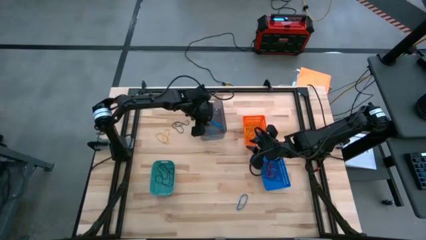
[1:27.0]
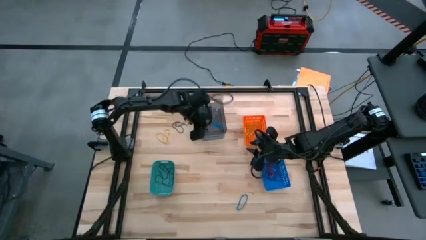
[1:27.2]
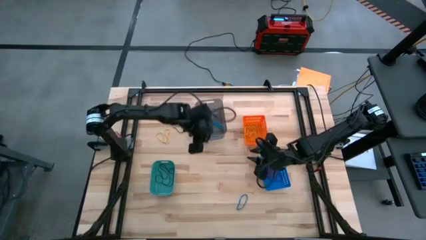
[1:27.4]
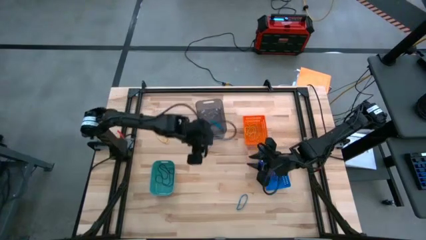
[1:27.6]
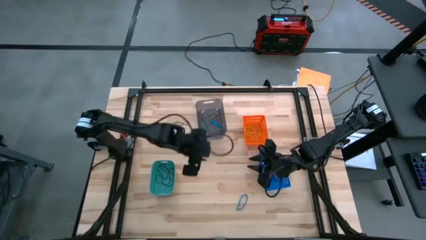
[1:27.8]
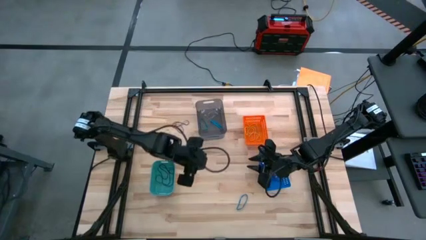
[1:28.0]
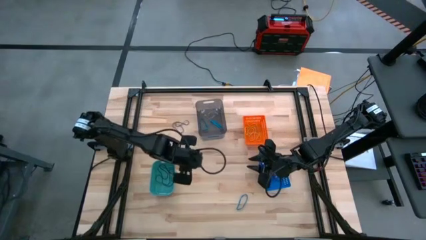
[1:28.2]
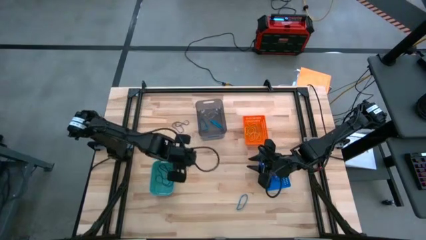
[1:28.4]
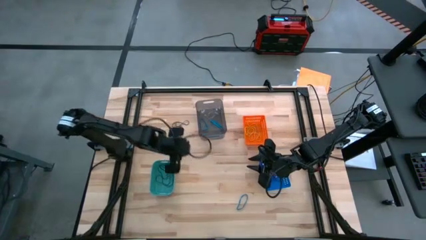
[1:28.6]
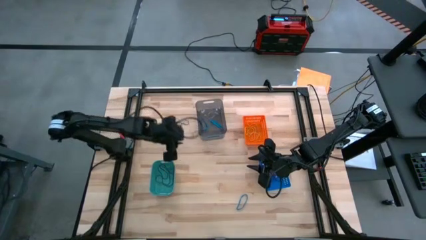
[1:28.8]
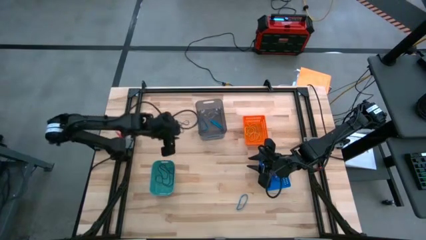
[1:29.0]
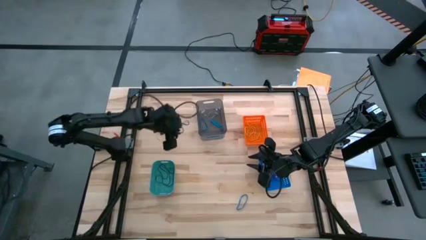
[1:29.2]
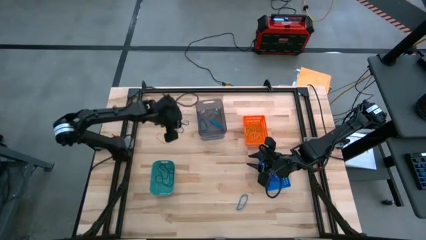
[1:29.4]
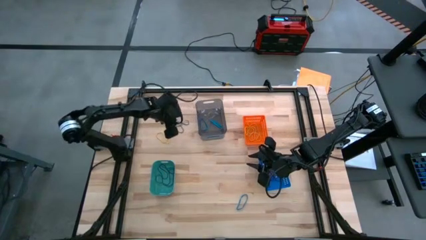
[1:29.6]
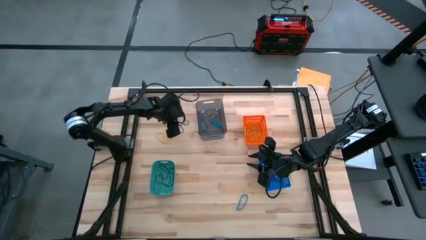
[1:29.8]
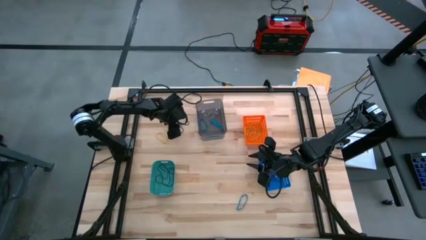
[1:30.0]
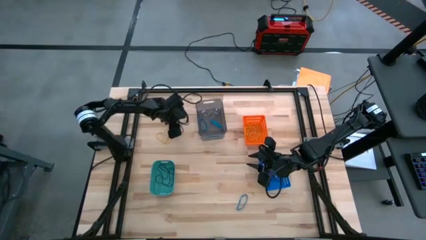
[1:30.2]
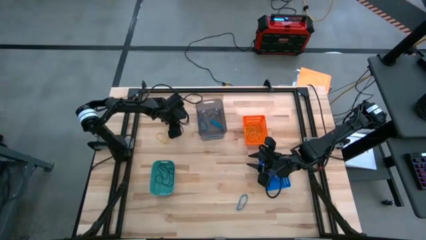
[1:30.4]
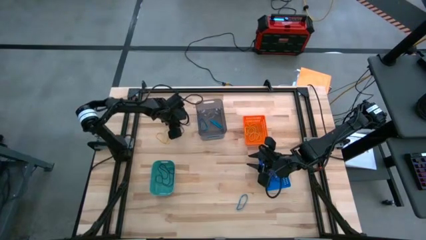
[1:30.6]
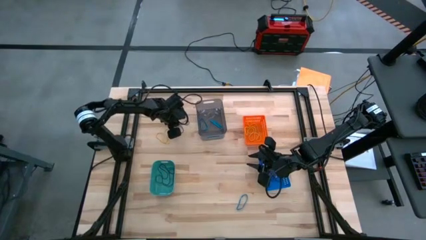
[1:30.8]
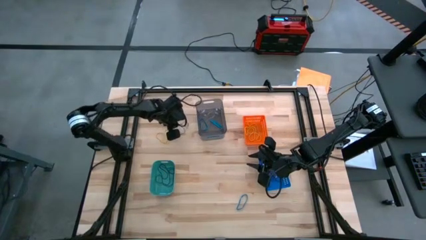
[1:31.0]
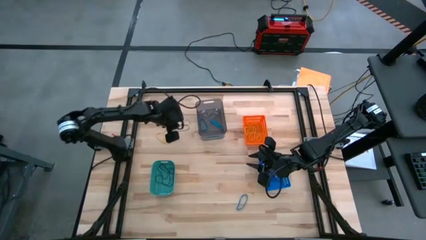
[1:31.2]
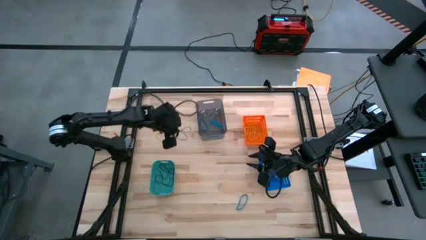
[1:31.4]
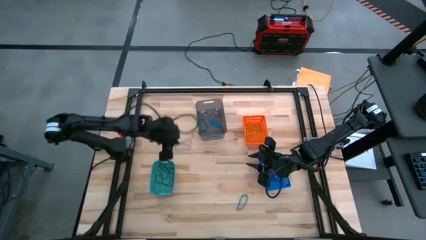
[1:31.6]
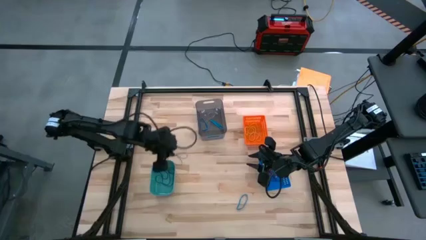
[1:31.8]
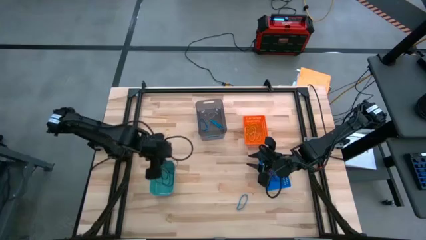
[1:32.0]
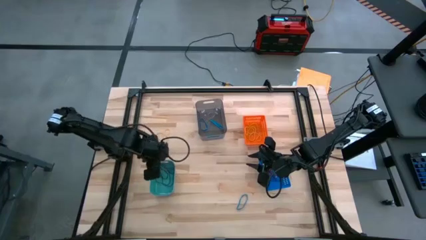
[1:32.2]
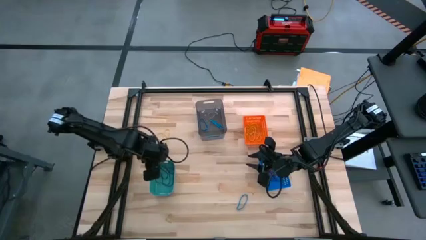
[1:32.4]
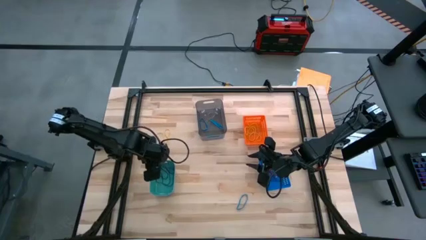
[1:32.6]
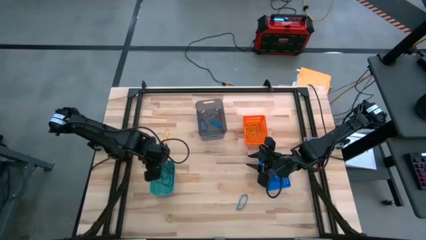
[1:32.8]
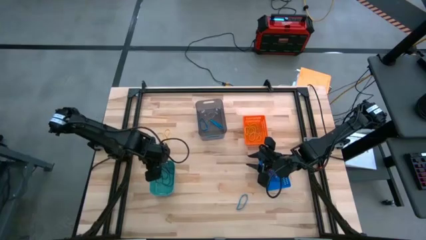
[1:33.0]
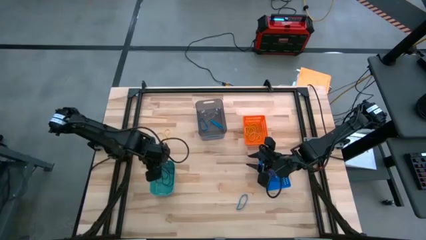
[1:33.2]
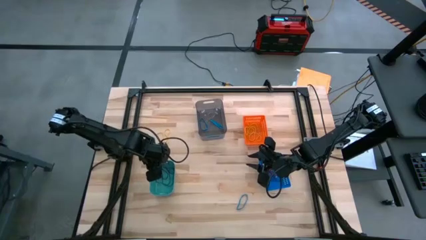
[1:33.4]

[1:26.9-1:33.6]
Task: Sort rubber bands into baskets
Put the black rubber band into the green bin

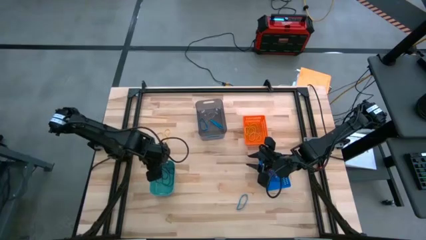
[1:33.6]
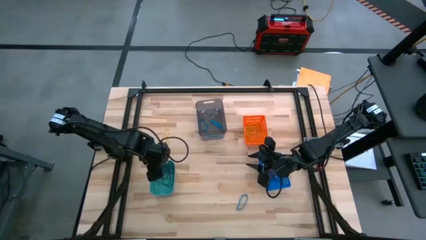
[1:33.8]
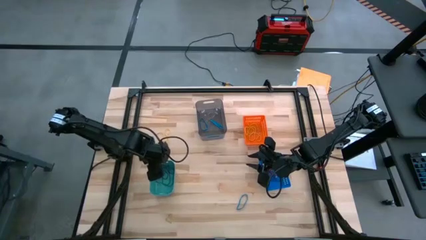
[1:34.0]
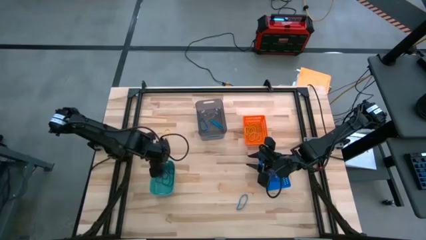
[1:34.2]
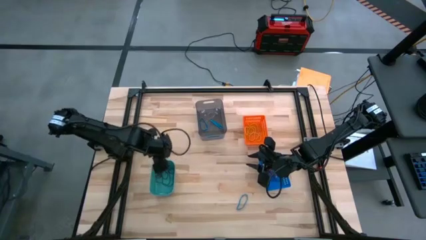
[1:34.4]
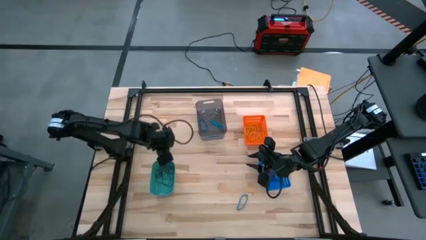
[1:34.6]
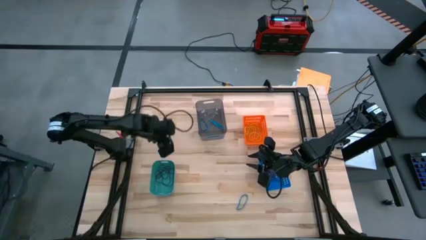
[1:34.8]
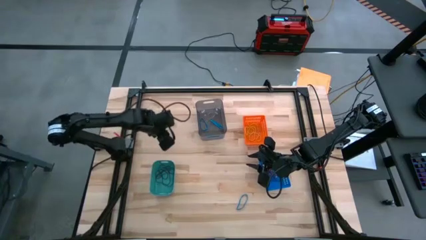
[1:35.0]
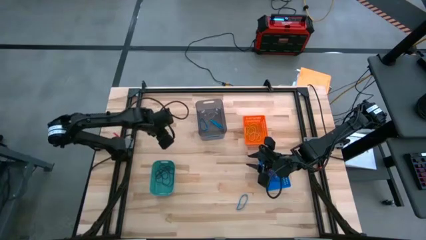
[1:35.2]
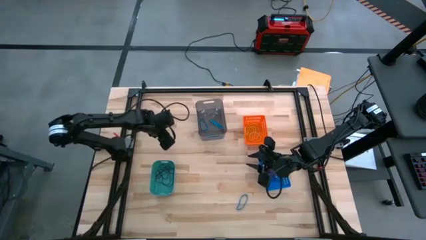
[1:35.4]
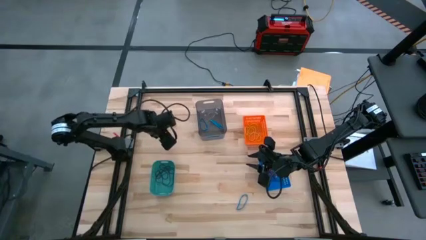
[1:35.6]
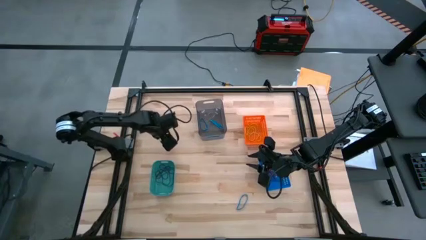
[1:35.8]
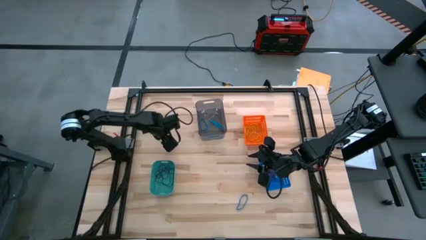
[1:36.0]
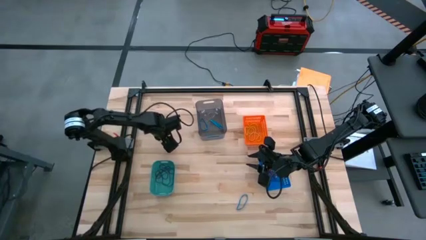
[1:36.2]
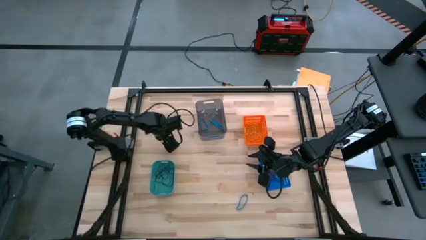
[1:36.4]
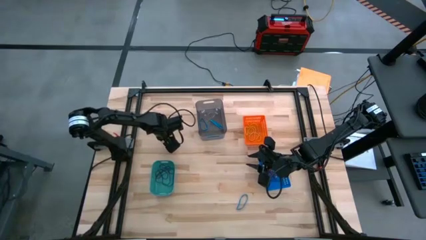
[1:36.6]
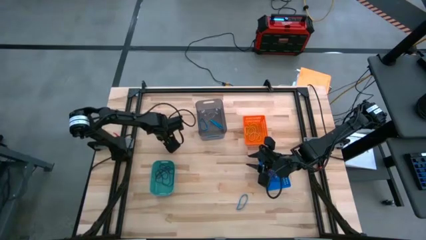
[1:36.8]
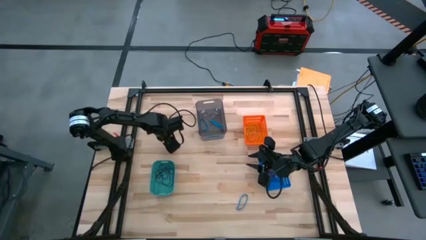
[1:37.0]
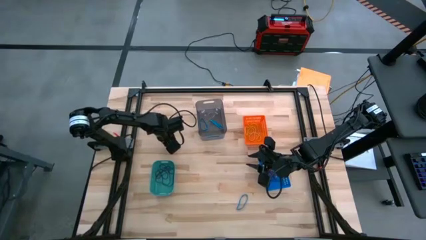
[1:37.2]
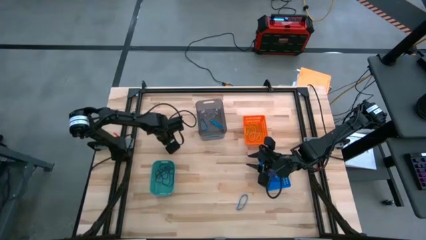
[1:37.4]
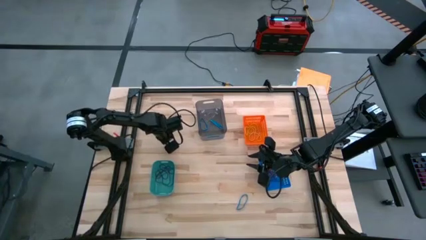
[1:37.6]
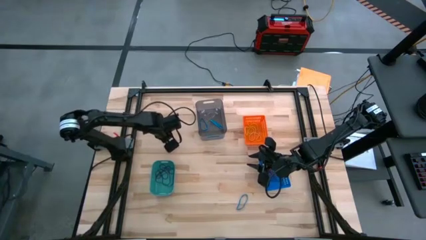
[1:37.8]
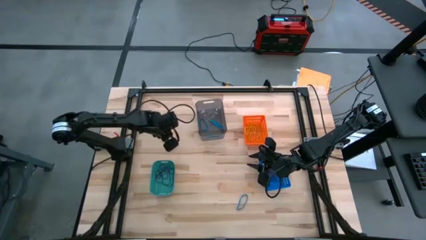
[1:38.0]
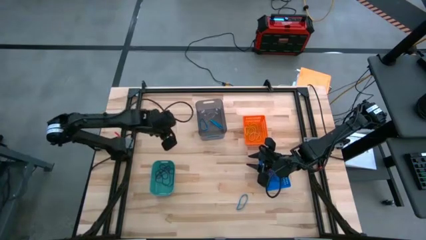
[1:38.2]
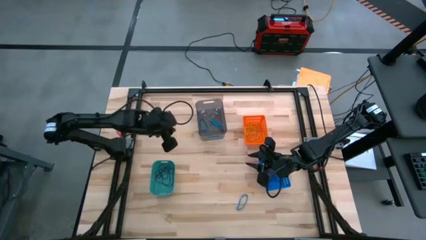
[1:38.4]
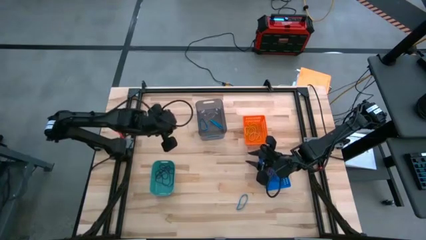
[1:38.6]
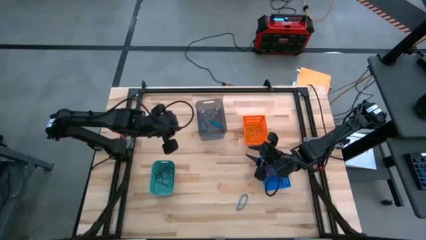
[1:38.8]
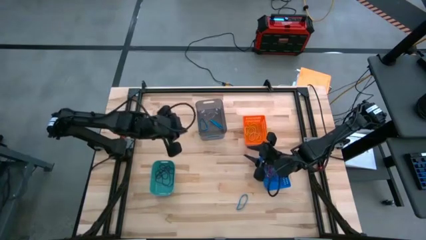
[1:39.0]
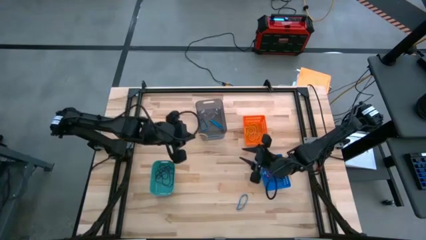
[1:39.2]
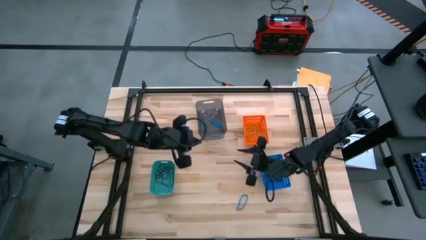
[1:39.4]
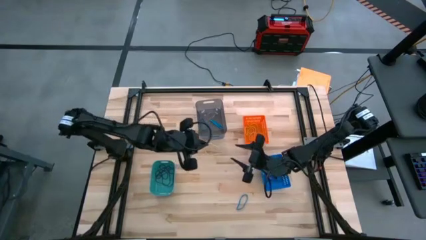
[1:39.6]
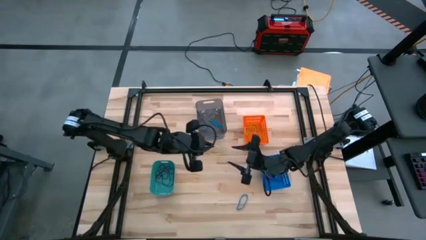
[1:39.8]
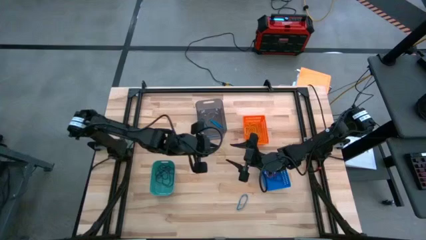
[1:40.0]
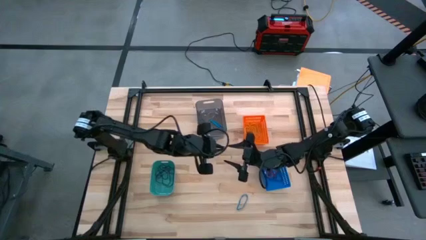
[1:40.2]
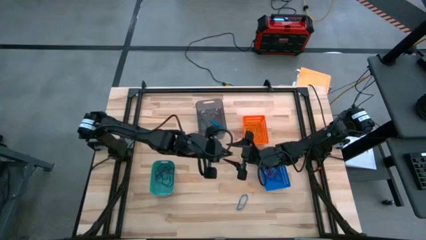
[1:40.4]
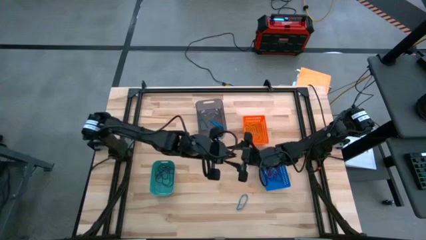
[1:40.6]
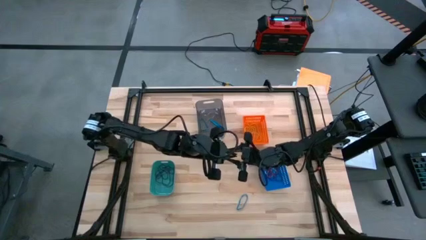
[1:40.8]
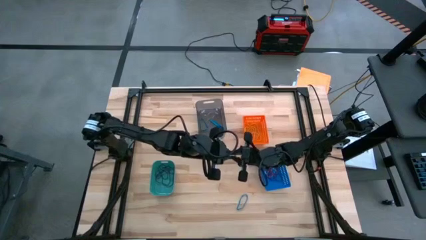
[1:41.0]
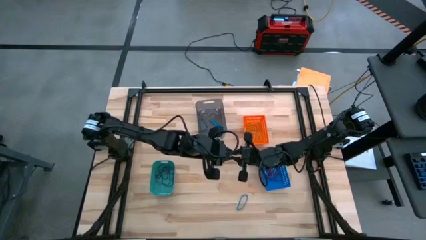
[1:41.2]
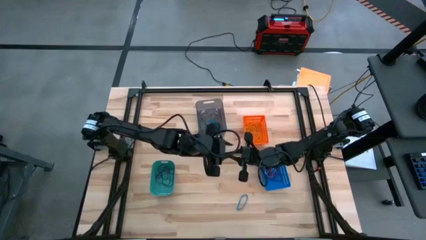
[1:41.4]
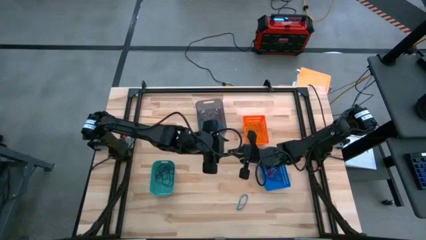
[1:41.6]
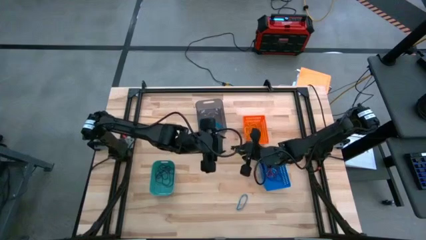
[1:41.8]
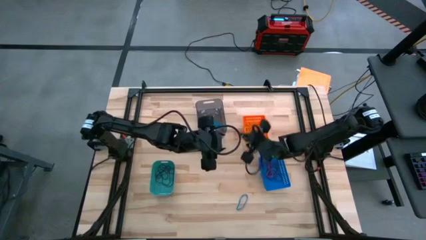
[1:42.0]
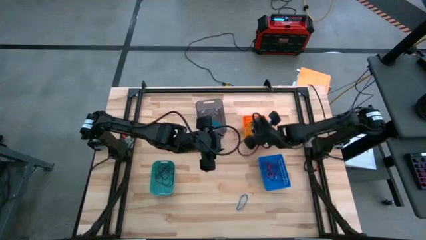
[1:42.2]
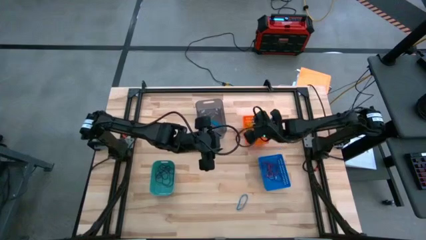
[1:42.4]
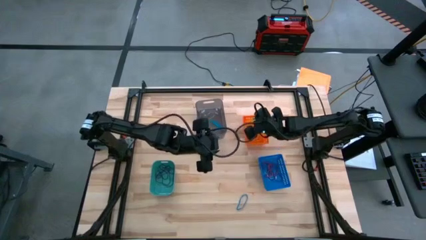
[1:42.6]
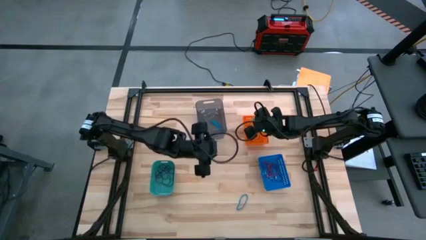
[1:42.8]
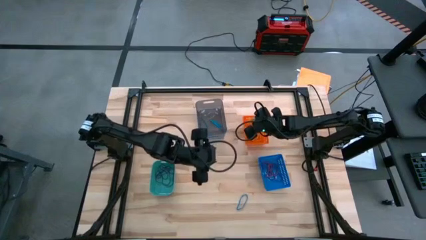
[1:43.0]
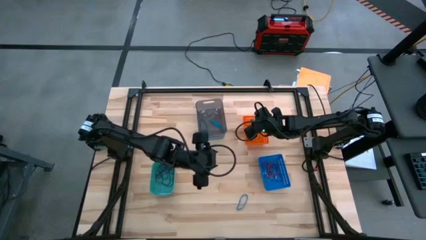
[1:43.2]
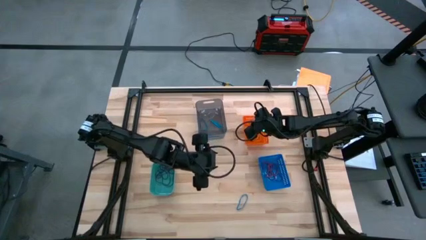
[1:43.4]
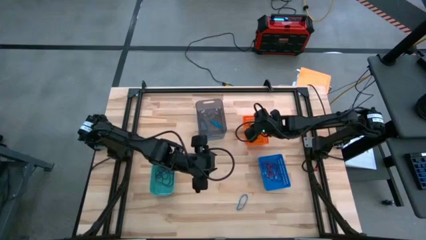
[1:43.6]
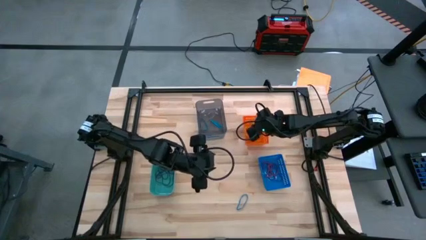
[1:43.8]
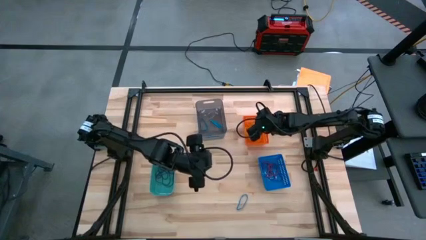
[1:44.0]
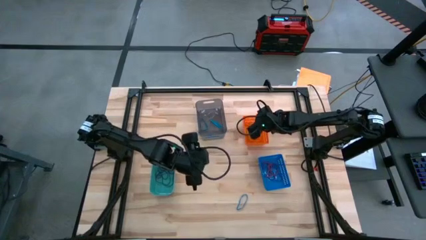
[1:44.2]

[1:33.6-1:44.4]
Put the yellow rubber band into the orange bin
